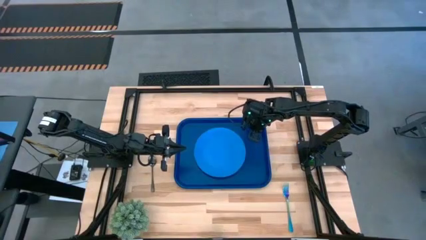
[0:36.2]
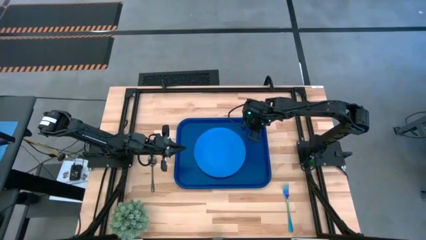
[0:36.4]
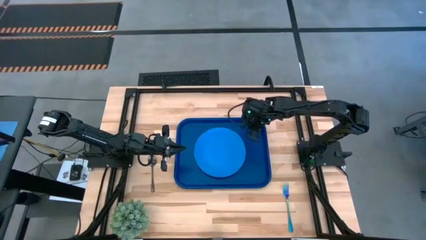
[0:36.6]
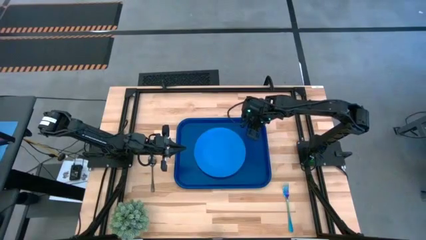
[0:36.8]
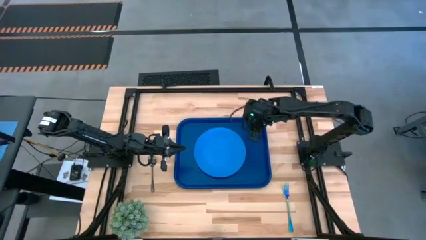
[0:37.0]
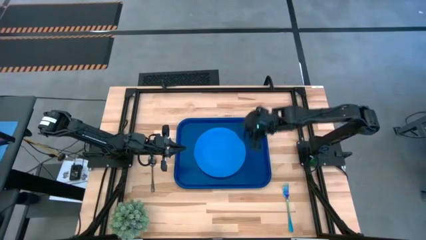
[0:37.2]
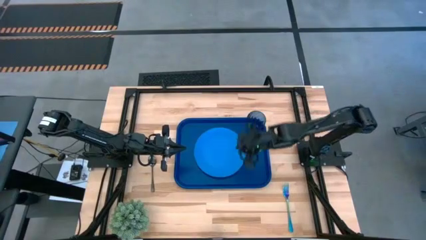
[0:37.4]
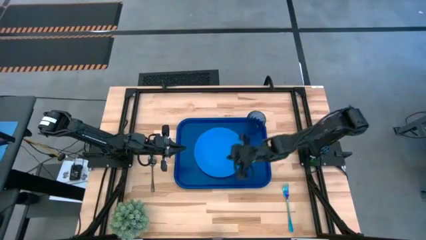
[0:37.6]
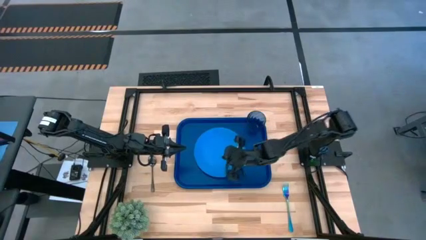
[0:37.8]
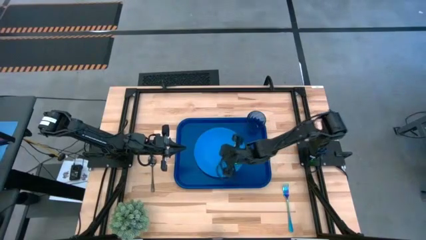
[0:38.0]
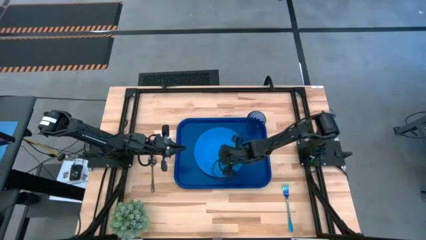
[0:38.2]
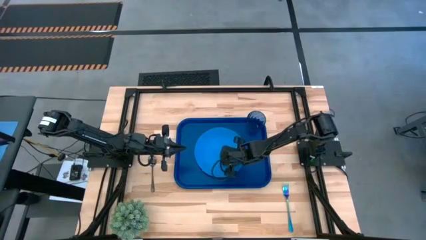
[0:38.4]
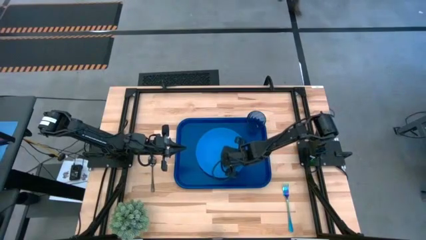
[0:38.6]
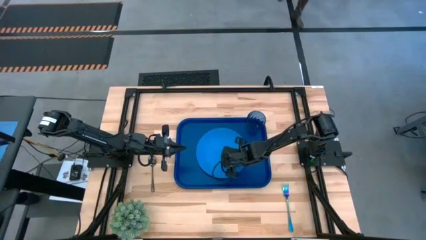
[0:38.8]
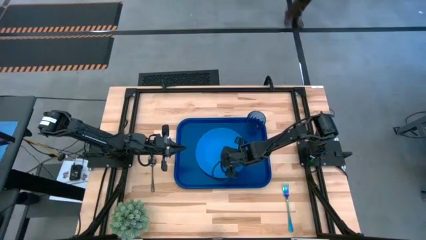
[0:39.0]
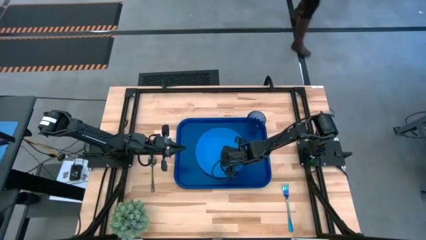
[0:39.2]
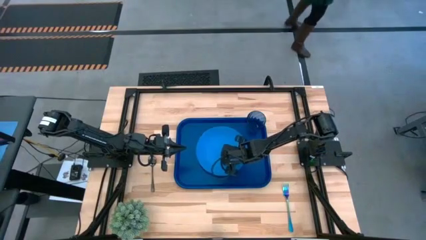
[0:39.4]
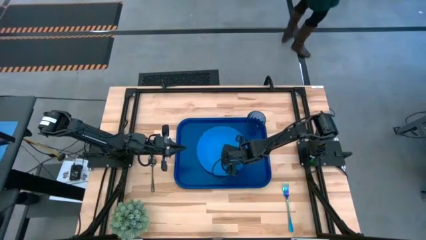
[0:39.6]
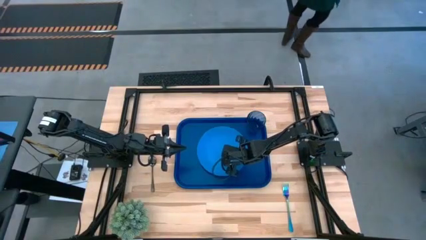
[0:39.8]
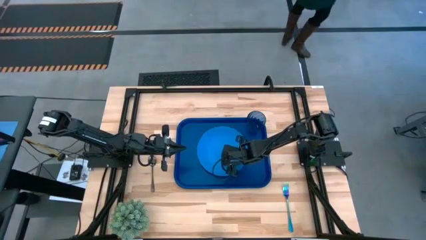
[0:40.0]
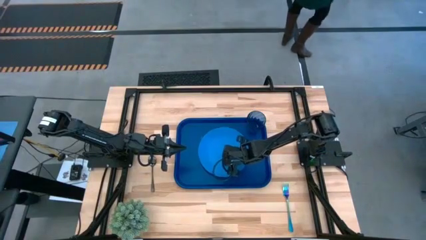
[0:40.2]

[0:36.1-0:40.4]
Task: Pick and place plate/cup/fork/spoon on tray
Adjust the blue plate on the dark blue tray

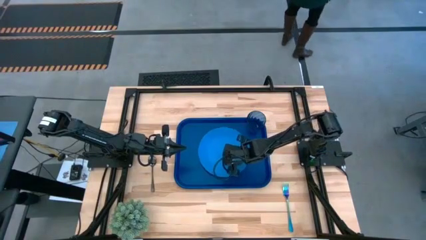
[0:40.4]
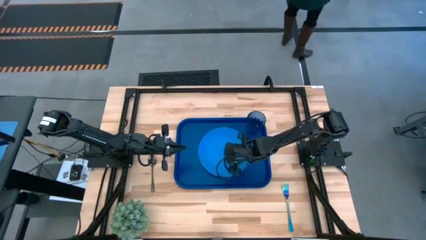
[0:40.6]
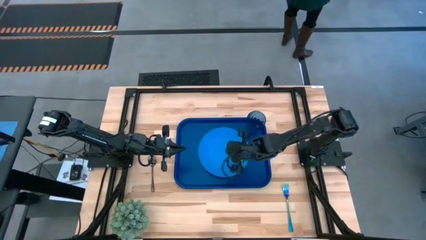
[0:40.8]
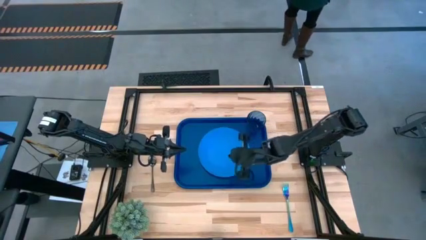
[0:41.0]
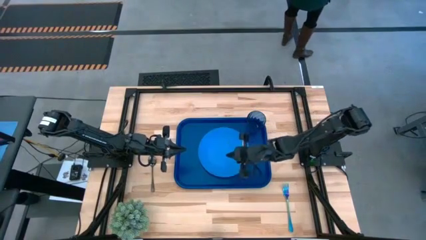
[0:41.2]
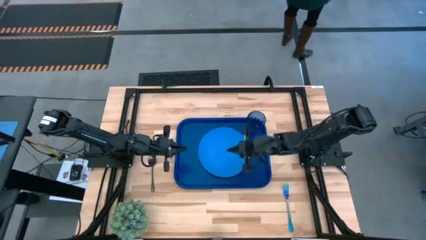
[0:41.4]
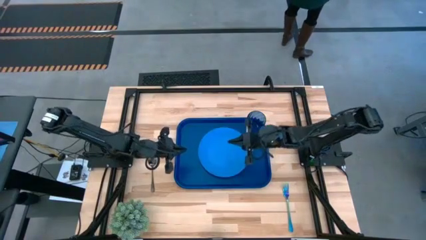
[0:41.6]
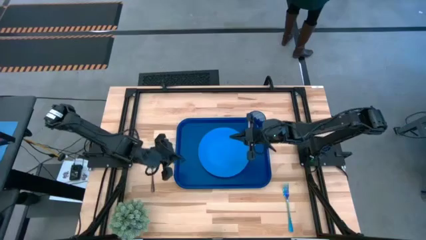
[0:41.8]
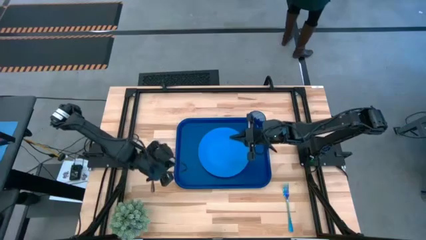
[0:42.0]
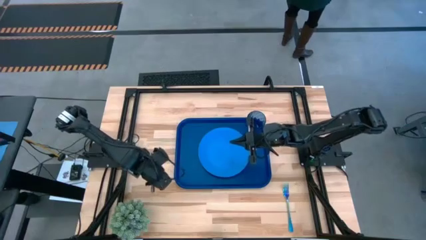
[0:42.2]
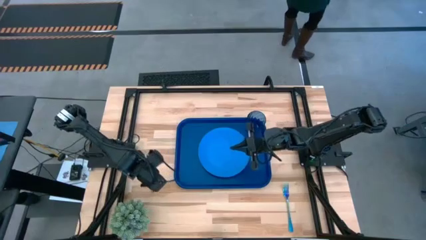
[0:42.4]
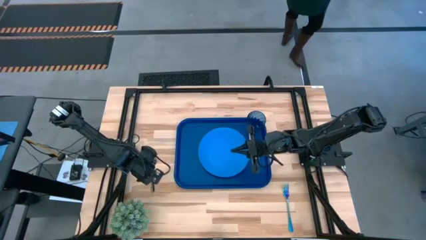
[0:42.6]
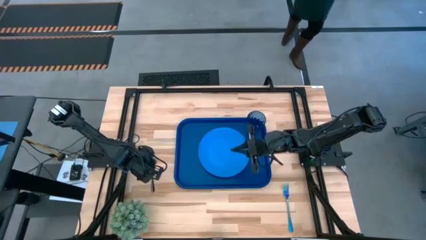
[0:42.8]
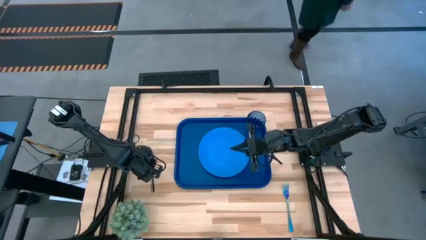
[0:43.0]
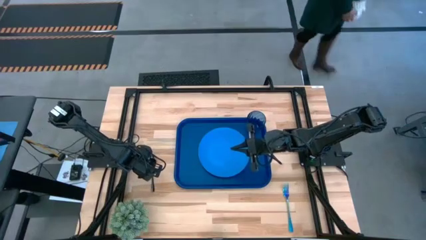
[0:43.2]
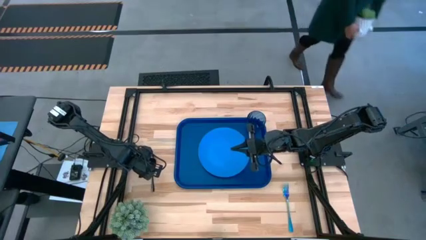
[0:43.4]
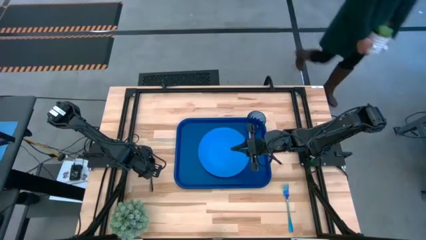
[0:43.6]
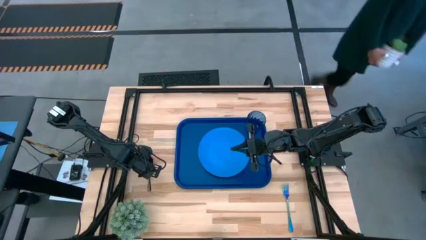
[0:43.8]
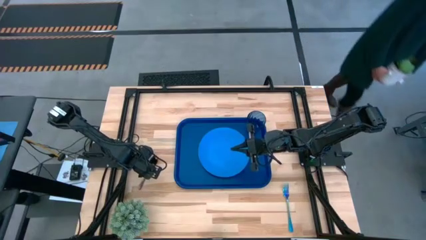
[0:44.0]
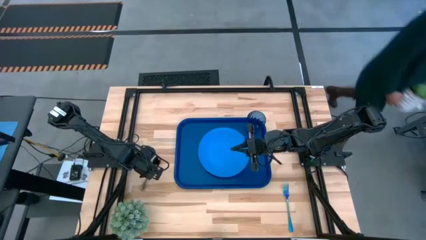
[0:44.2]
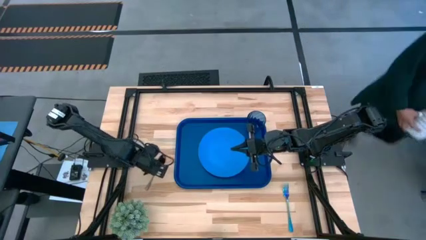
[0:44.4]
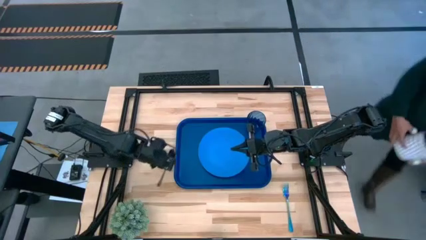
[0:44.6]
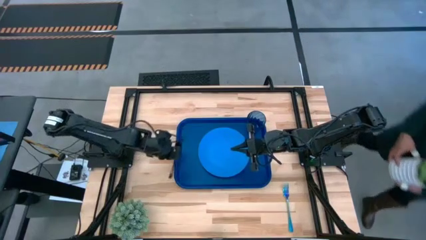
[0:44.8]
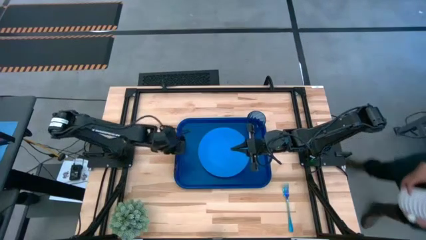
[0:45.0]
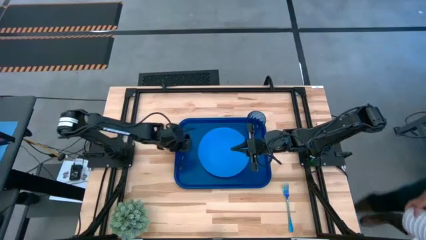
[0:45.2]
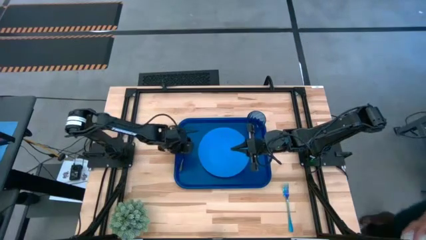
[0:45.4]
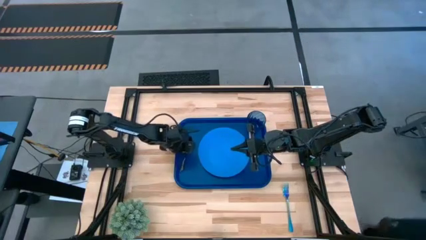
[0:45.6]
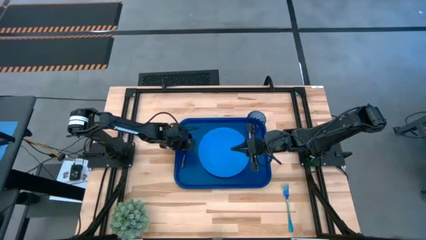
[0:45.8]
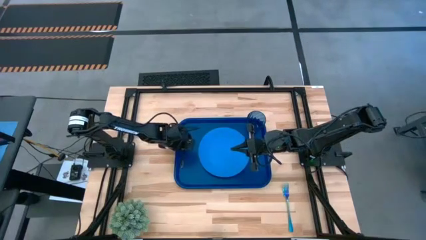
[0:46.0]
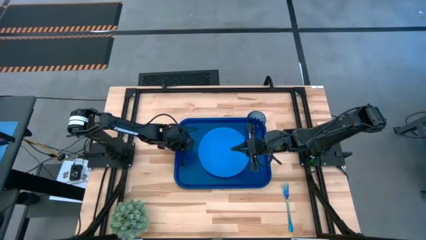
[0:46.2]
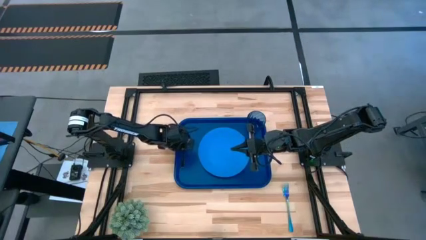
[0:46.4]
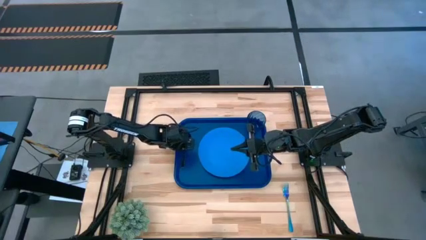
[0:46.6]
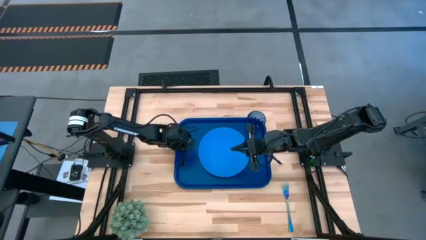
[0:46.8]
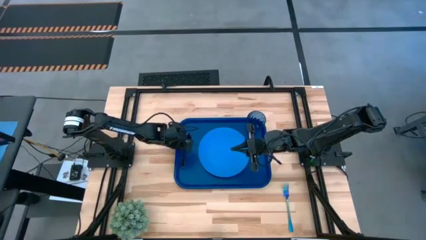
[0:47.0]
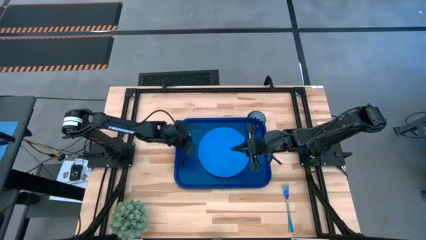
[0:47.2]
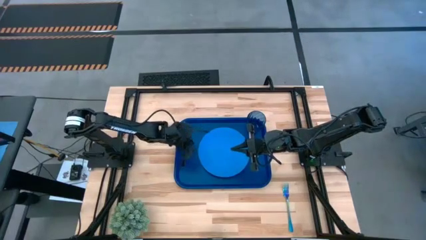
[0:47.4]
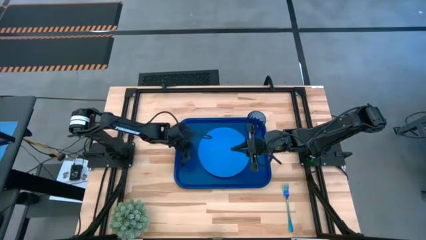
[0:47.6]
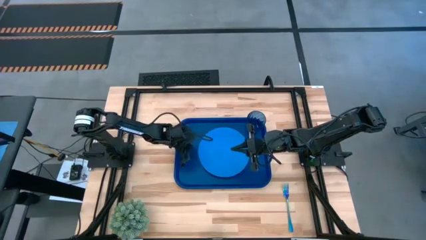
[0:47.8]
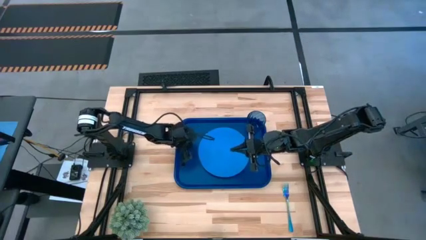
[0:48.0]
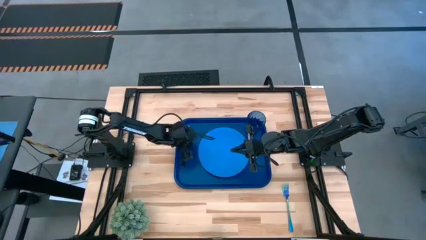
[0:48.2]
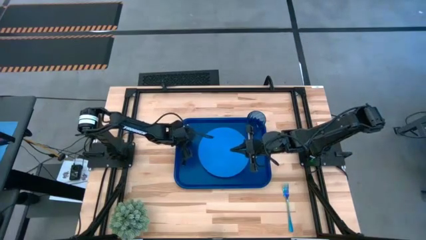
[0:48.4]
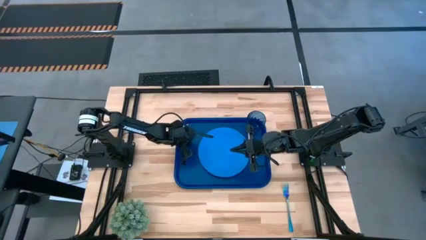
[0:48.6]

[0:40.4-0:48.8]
Put the black spoon on the dark blue tray to the left of the blue plate

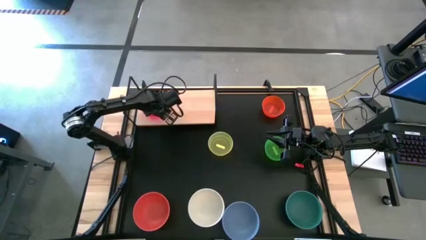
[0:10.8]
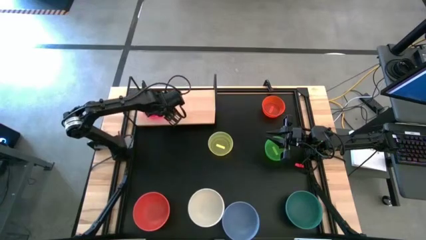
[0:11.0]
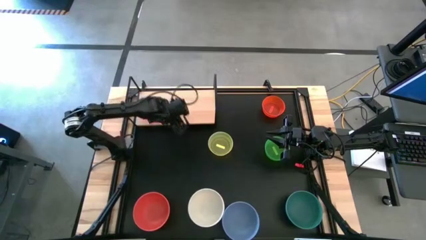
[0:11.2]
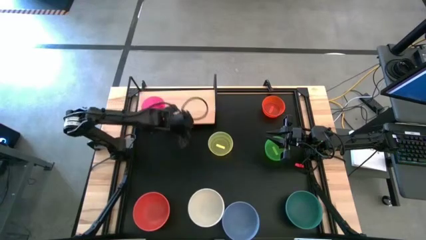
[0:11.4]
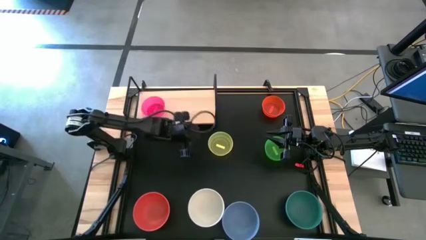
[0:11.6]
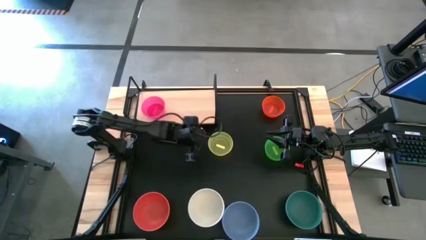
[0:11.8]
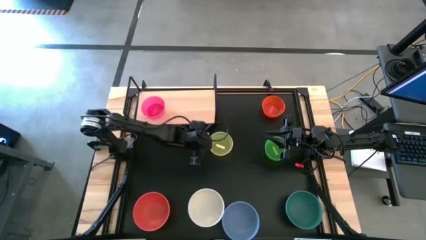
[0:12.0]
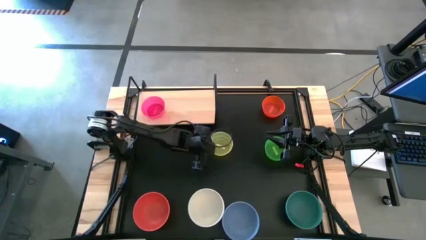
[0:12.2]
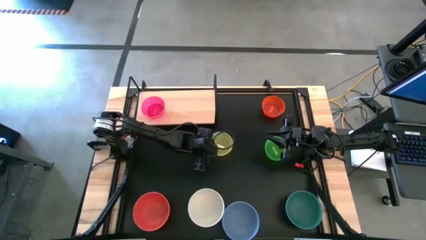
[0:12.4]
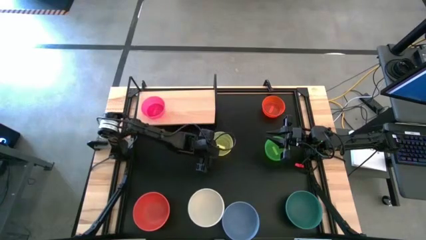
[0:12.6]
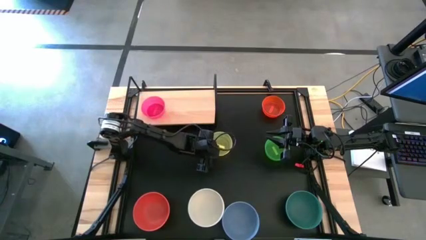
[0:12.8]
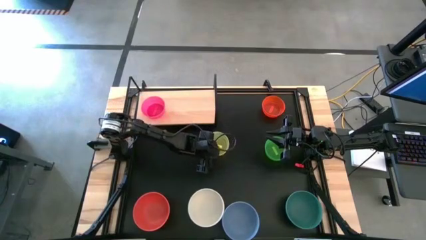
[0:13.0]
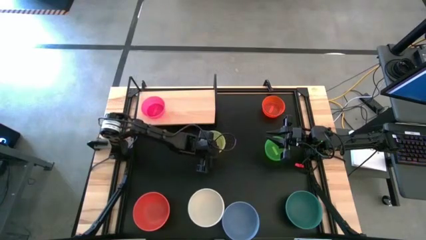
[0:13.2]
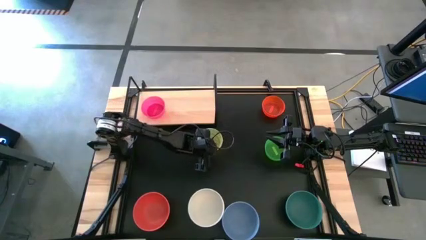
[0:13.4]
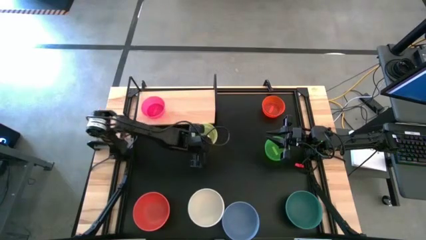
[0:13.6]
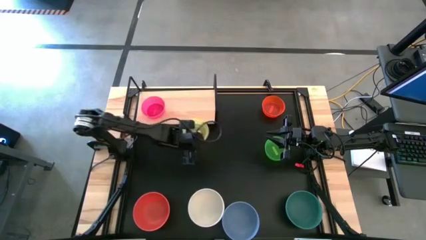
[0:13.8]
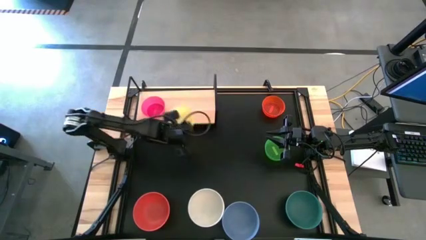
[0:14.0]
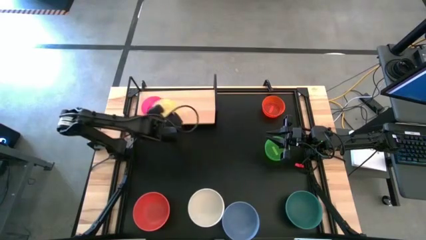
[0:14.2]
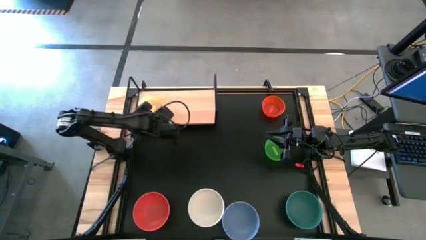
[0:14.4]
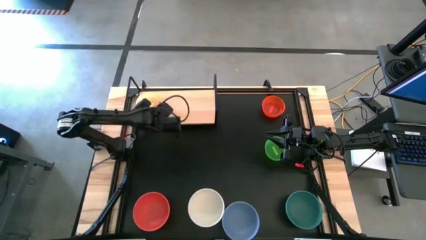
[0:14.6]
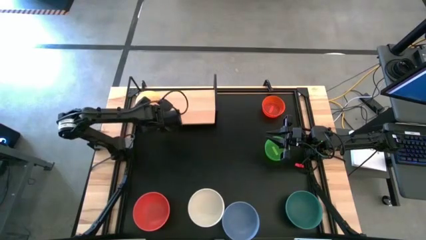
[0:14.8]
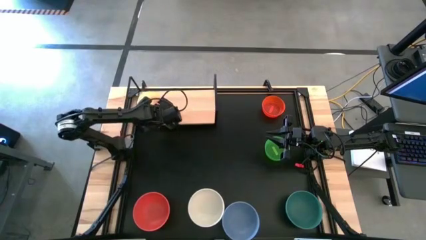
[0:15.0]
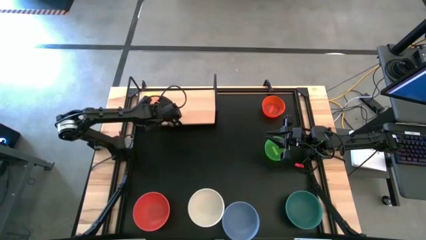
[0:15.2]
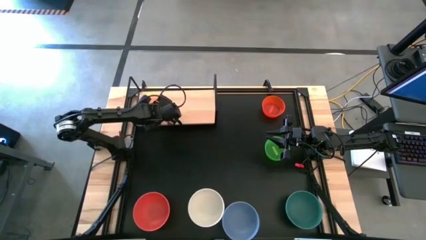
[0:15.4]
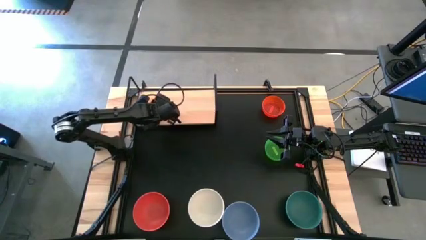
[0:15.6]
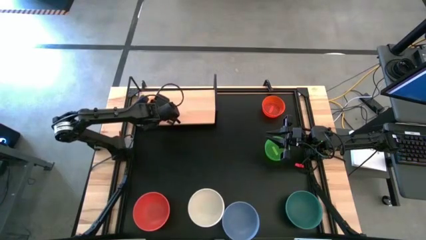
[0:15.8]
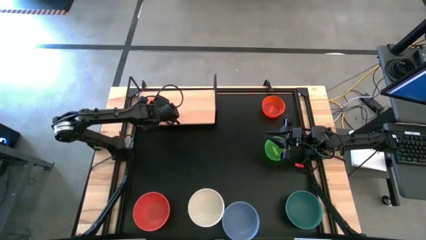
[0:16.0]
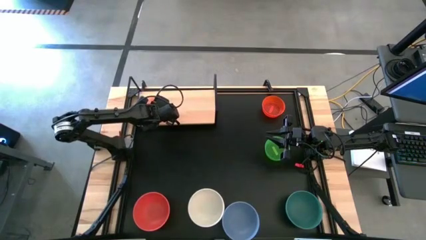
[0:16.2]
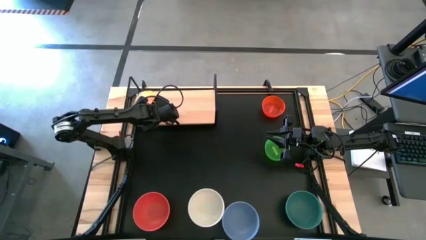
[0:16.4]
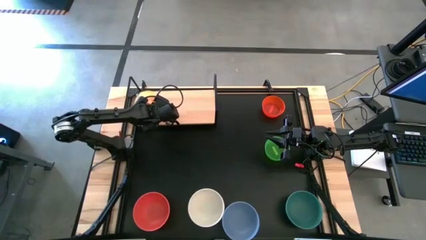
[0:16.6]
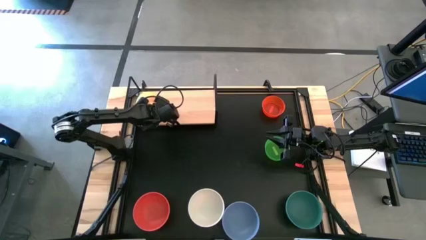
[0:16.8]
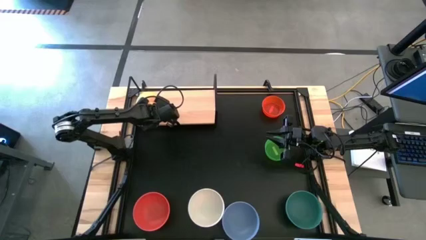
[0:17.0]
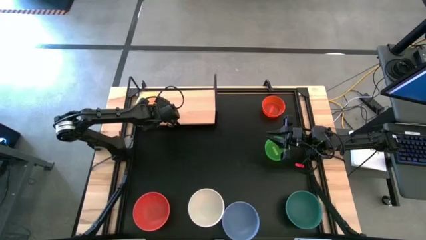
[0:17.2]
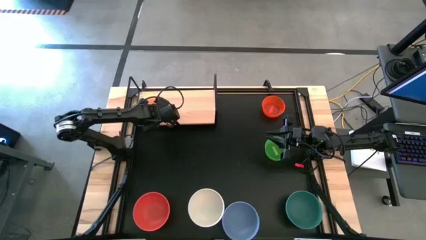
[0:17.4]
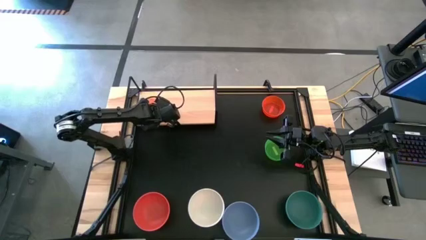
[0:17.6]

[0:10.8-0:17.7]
Task: Place and stack bowls onto a shelf
Stack the yellow bowl on top of the pink bowl on the shelf
